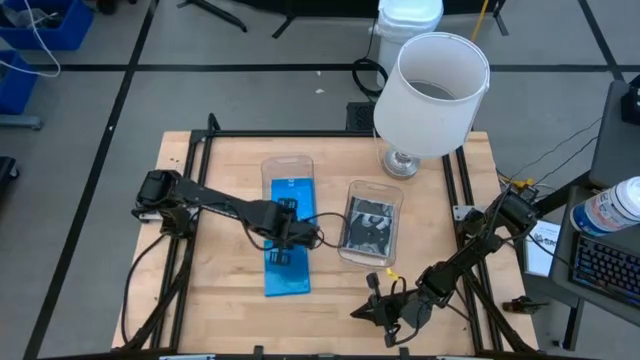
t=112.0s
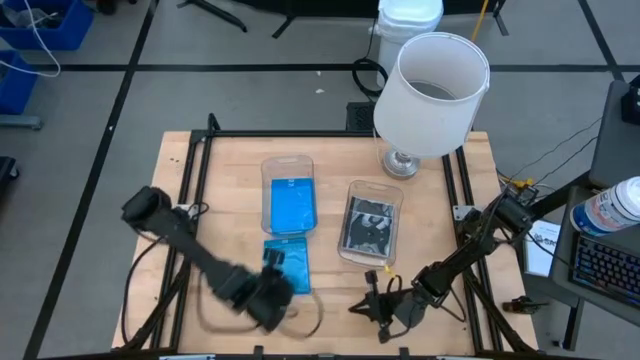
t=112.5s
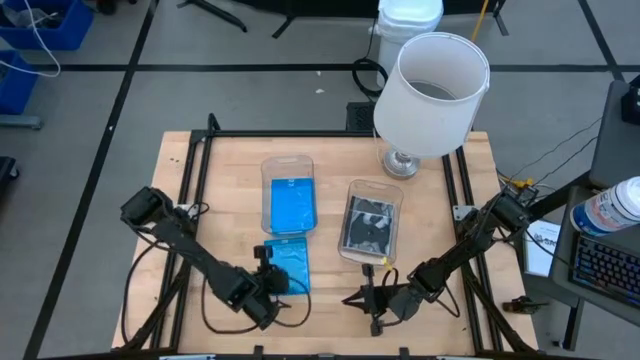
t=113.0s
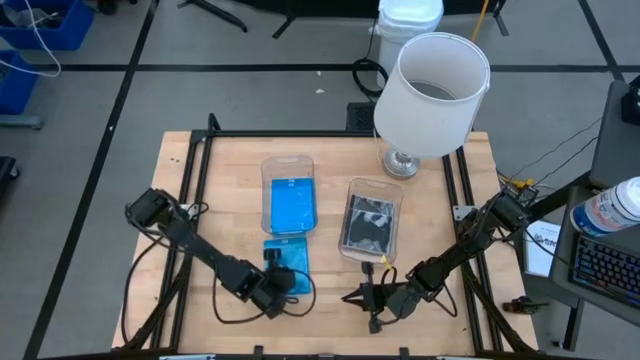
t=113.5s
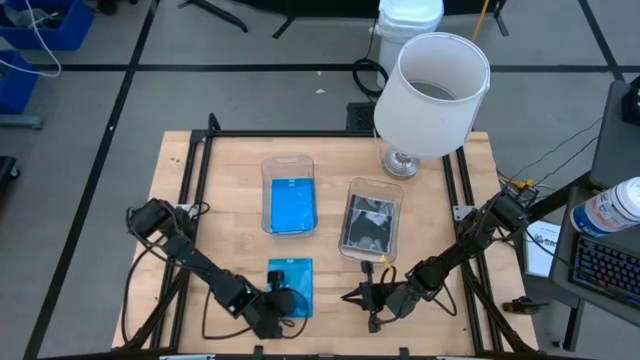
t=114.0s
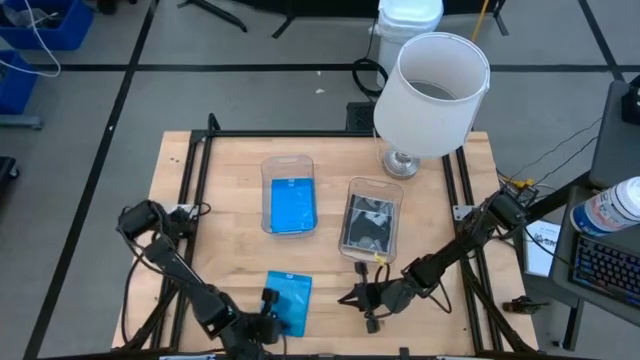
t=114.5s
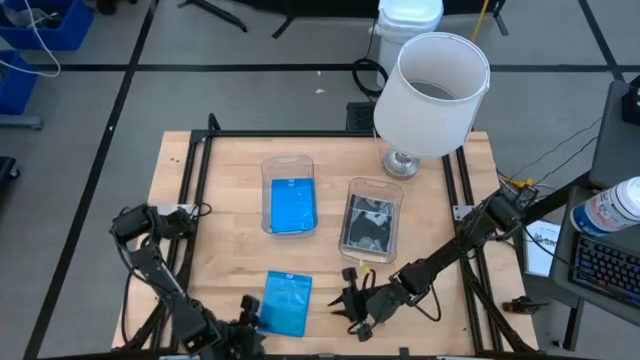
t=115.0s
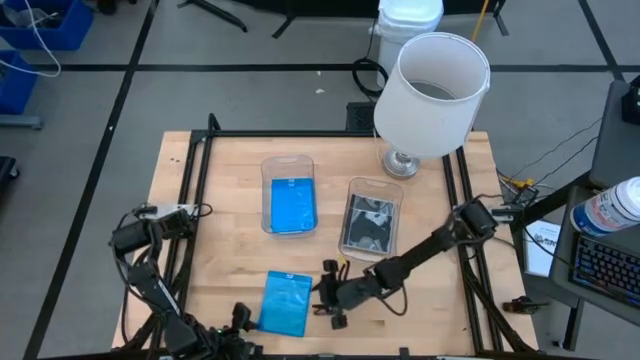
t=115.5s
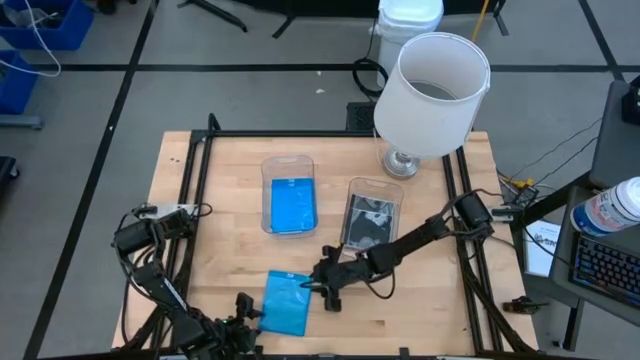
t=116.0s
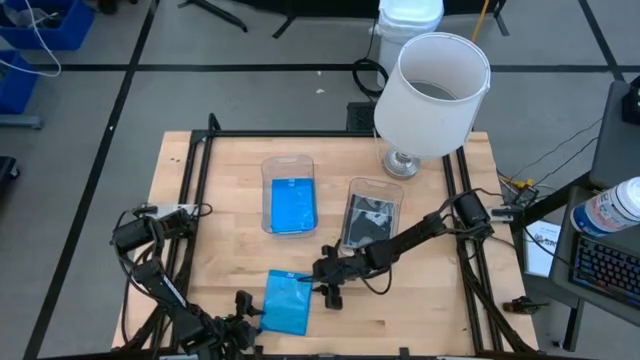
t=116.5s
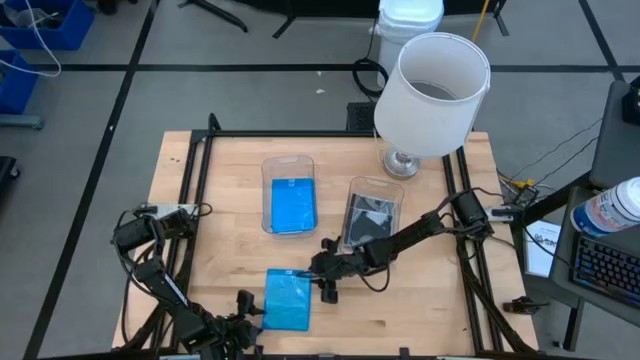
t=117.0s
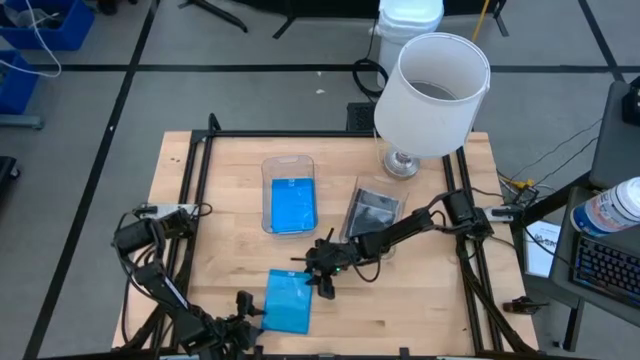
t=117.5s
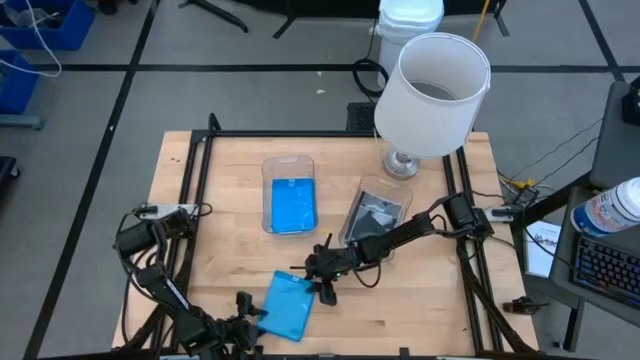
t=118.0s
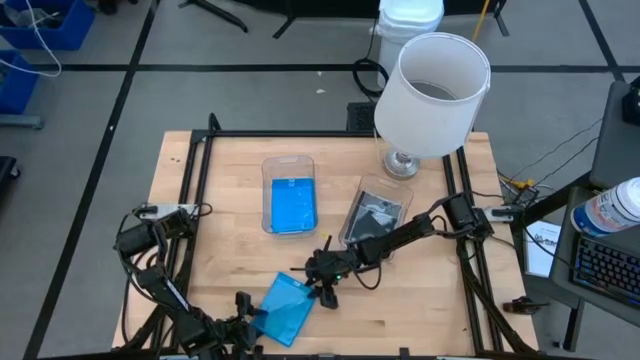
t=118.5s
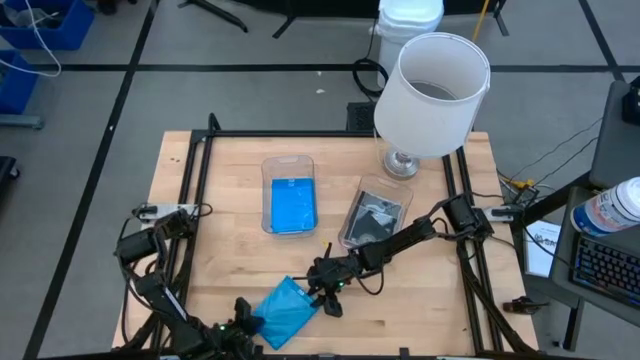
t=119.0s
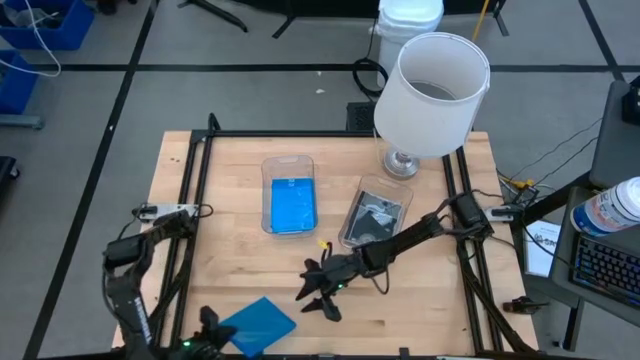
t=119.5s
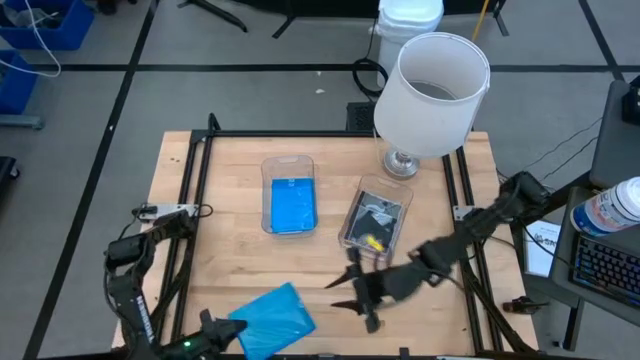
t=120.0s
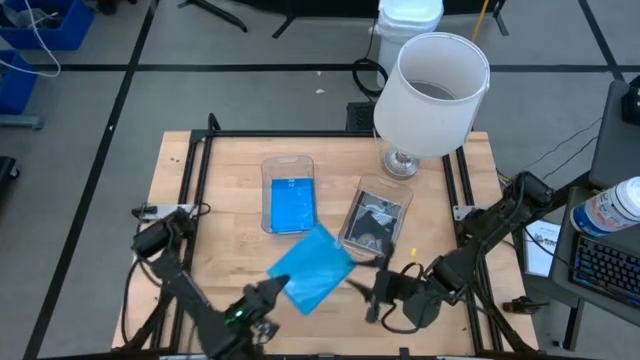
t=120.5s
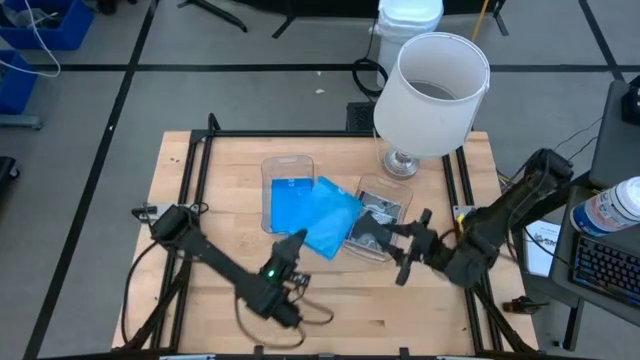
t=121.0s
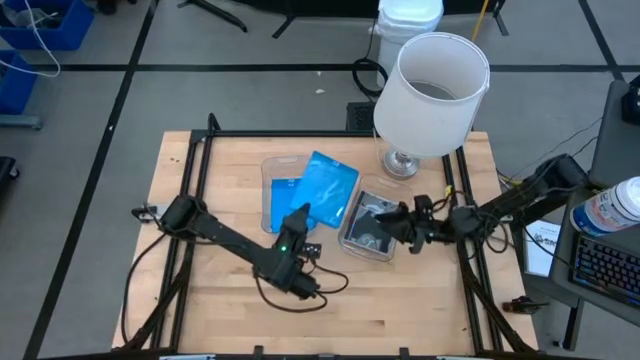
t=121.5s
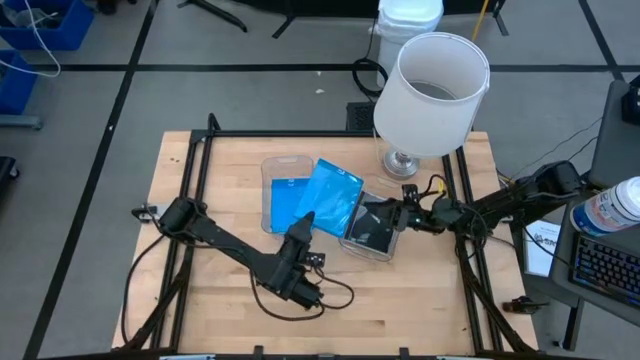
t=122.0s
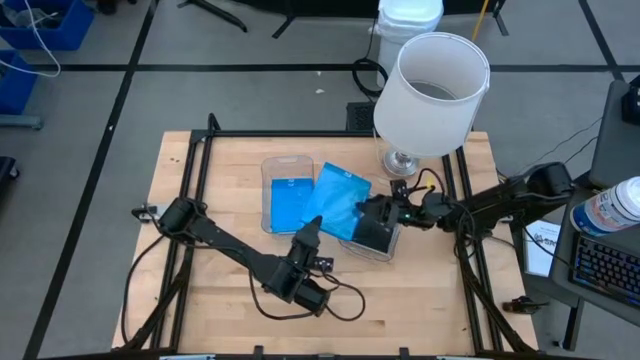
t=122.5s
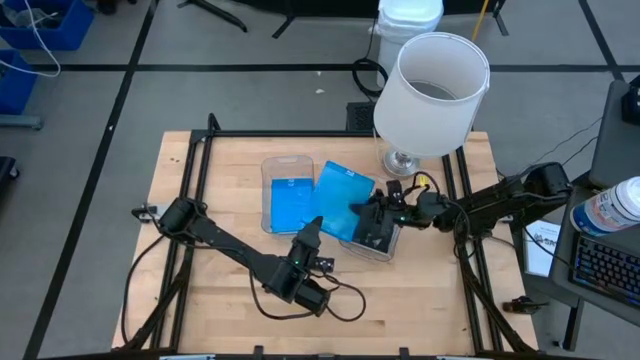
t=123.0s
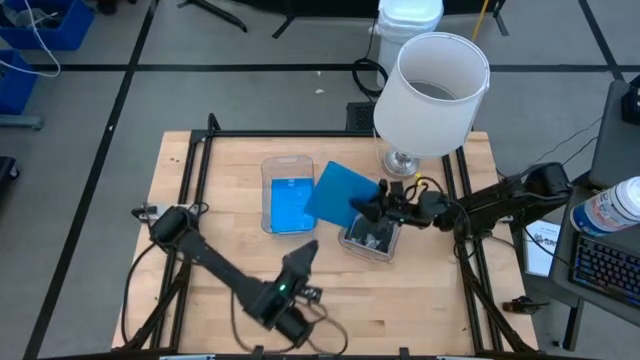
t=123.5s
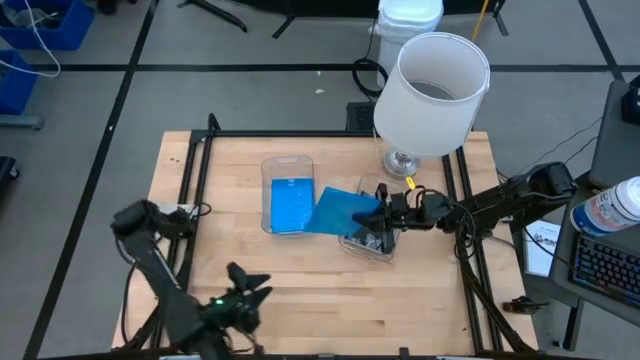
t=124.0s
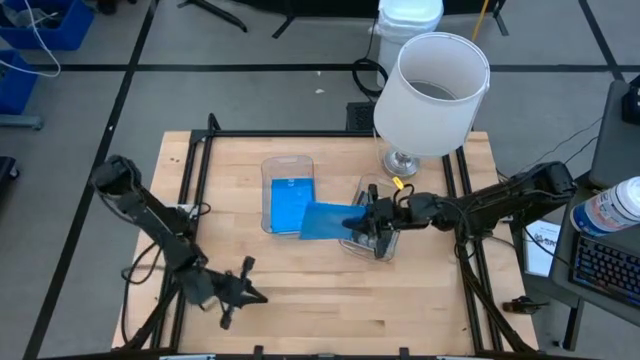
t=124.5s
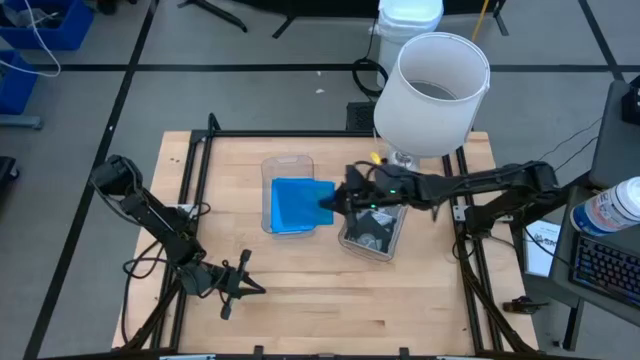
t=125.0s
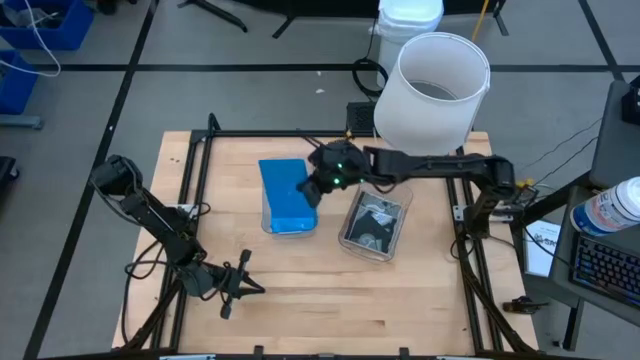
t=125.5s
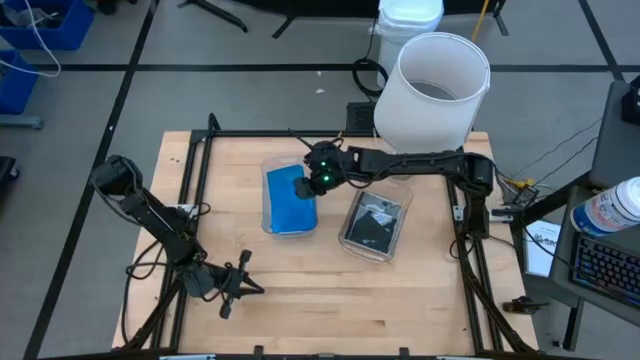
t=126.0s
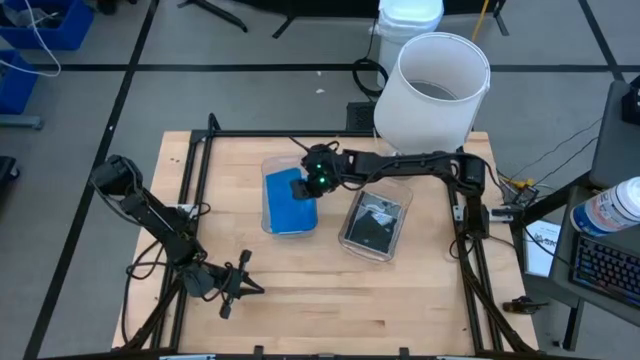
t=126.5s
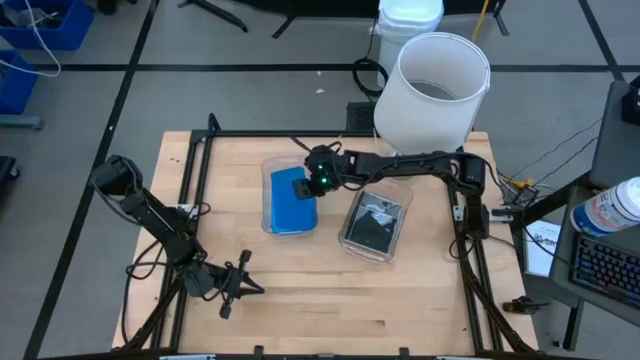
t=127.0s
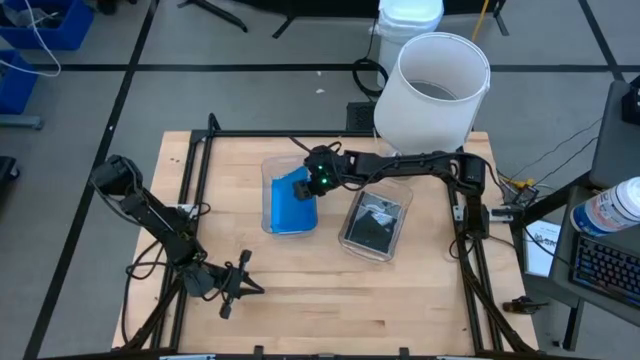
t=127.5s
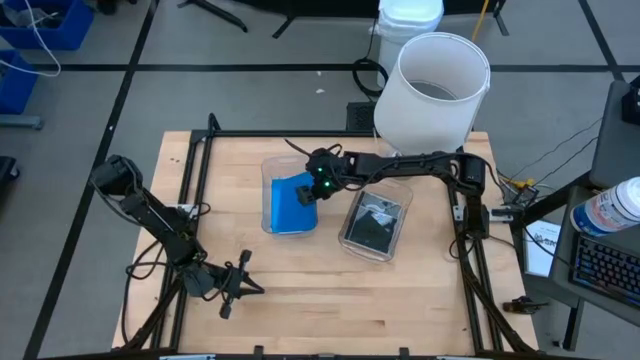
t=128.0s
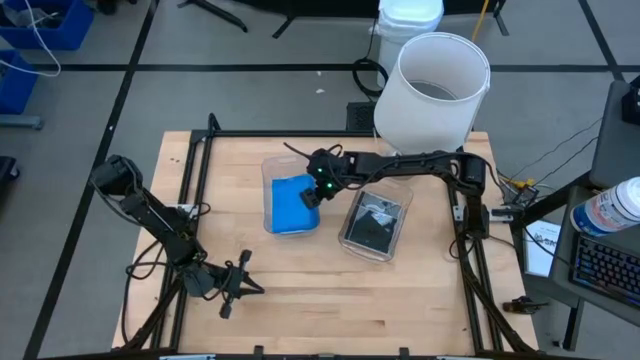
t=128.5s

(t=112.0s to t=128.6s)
Task: Pick & place jewel cases by type
Put the blue cd case into the left transparent bin

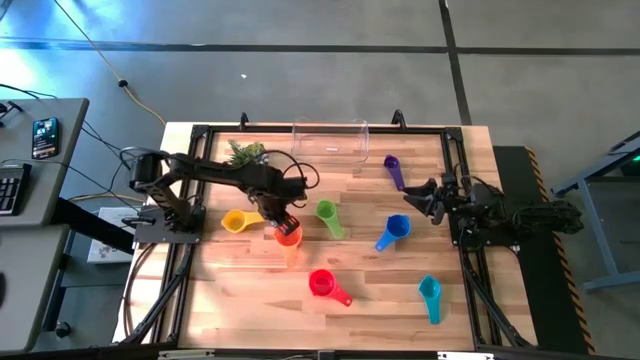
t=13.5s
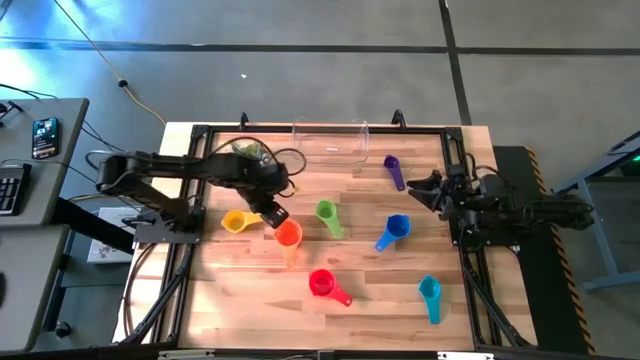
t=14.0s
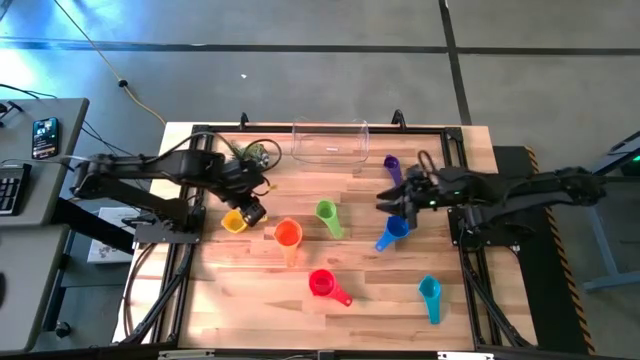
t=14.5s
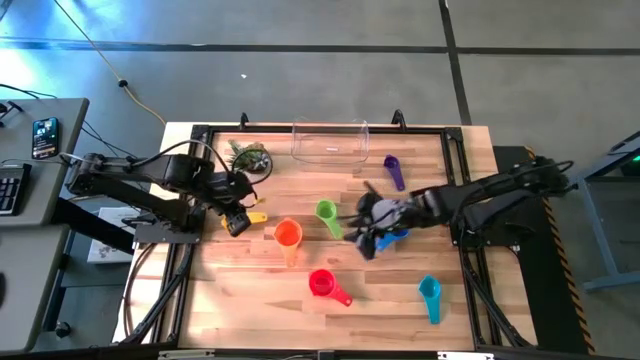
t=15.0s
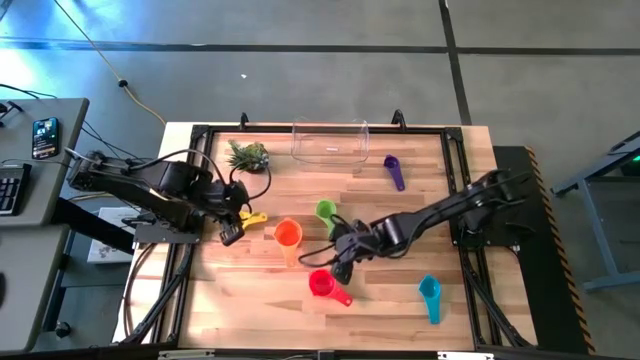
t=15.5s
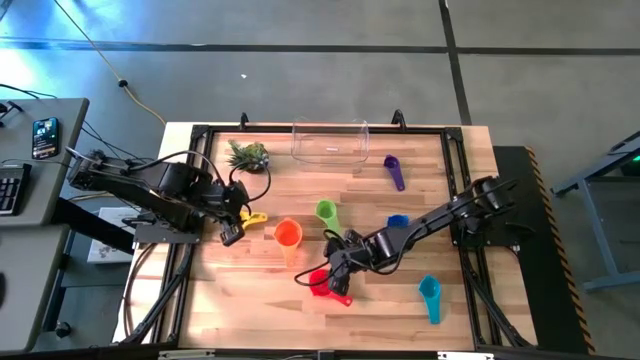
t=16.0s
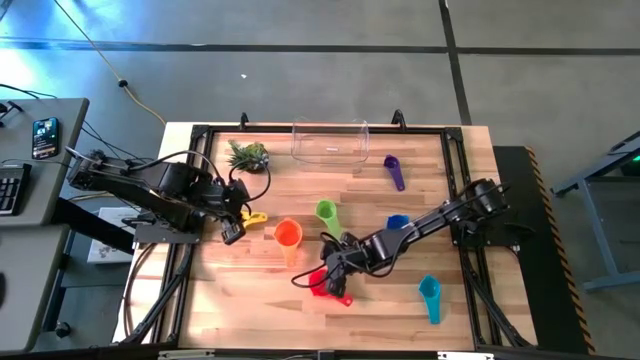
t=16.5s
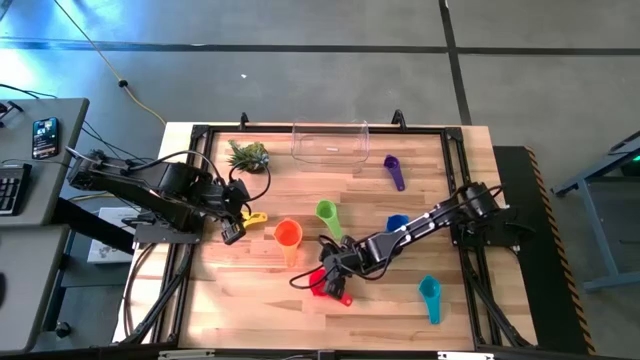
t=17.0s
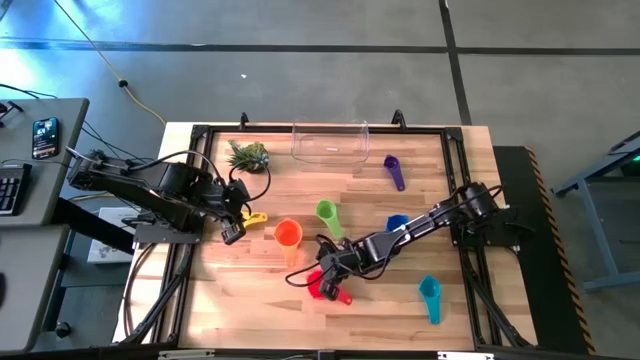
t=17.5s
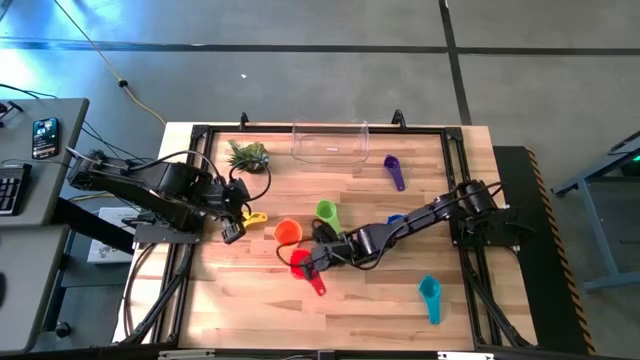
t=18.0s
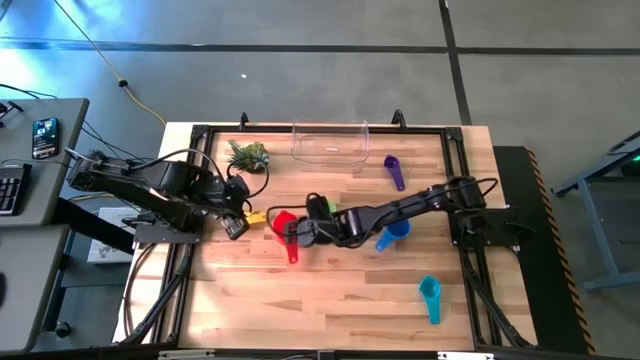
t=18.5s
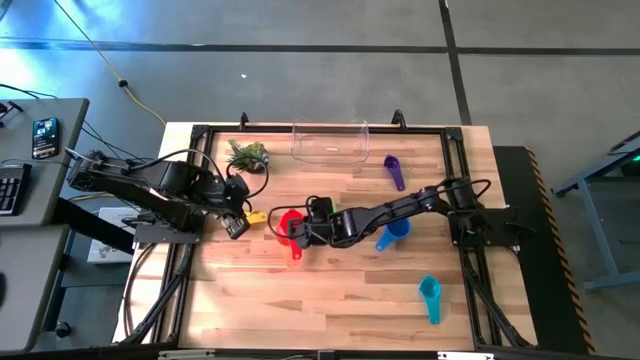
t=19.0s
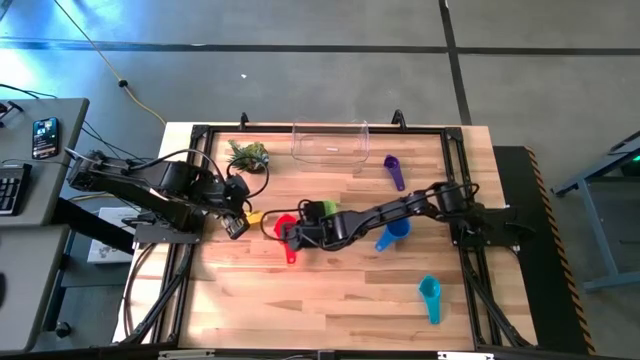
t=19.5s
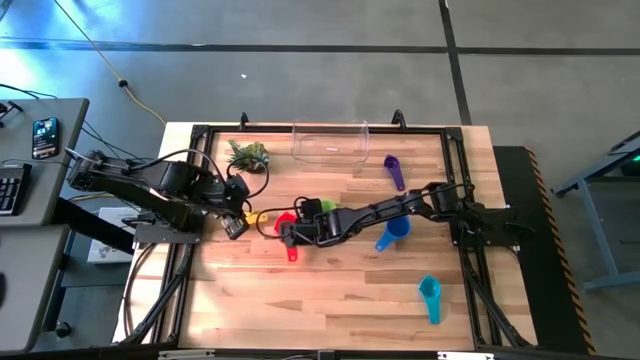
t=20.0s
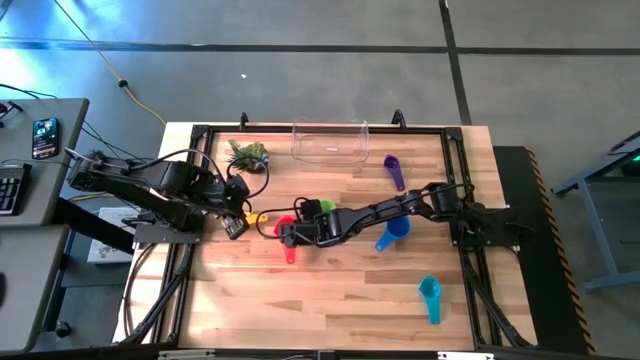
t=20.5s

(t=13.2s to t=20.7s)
Task: Nest measuring cups in basket
Stack the red measuring cup on top of the orange measuring cup
